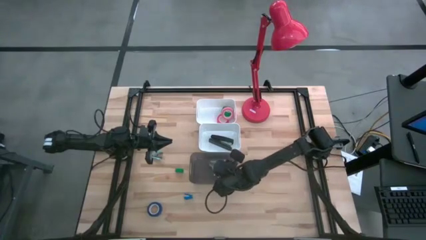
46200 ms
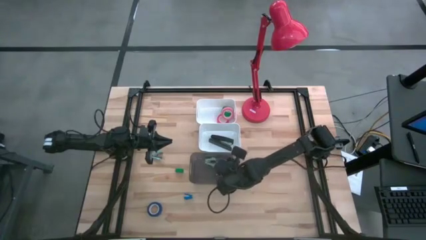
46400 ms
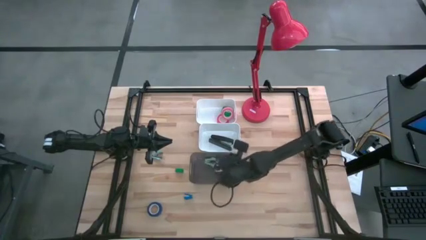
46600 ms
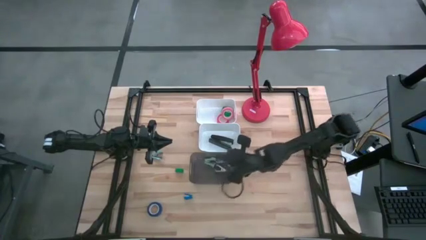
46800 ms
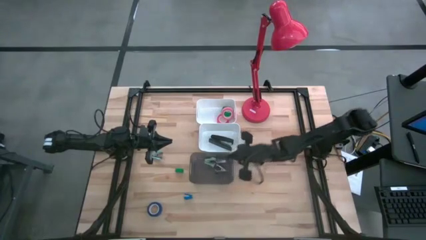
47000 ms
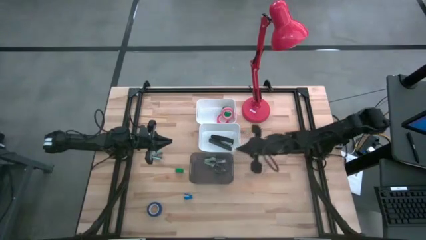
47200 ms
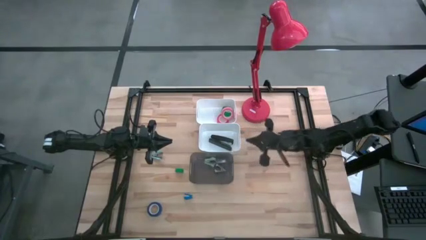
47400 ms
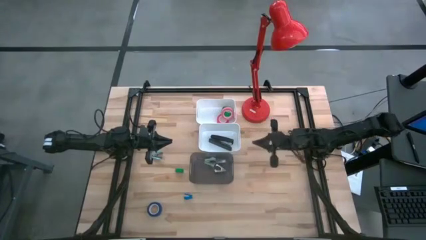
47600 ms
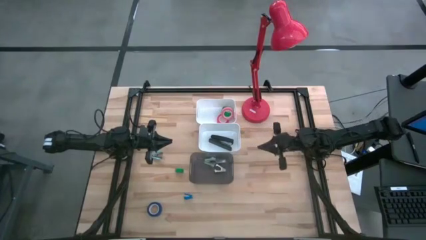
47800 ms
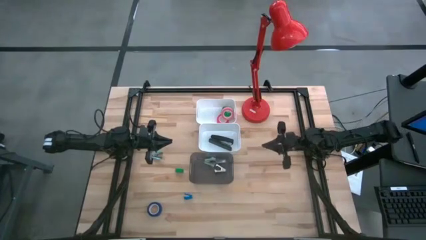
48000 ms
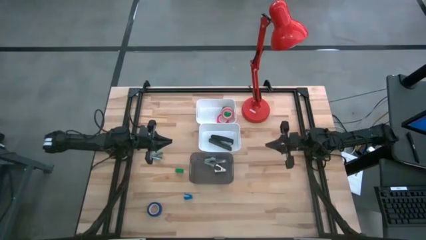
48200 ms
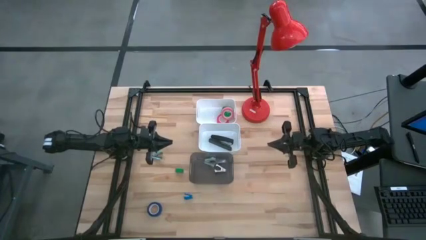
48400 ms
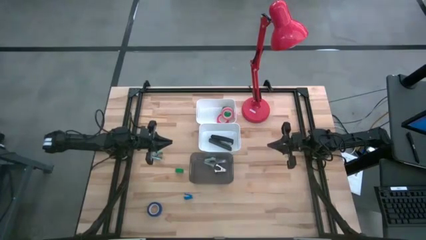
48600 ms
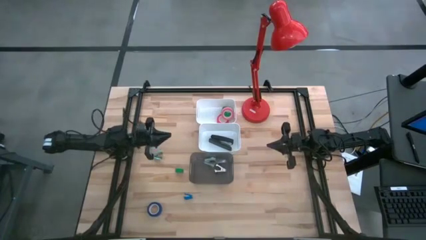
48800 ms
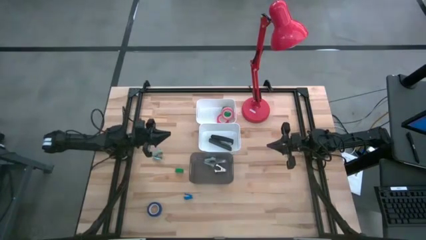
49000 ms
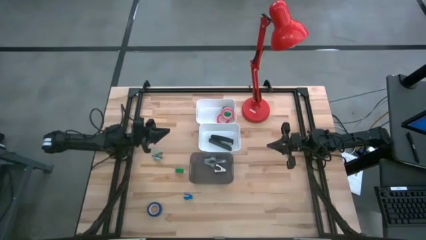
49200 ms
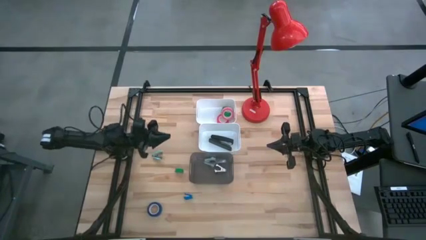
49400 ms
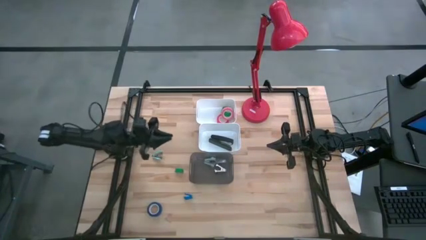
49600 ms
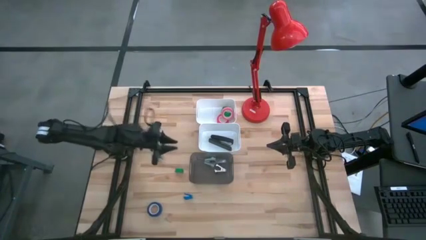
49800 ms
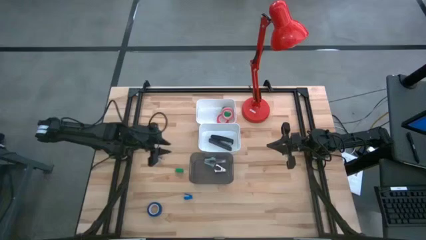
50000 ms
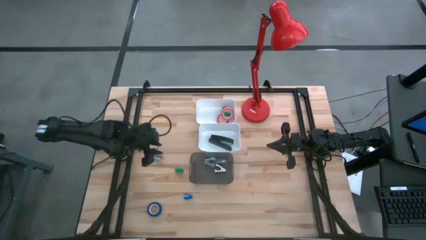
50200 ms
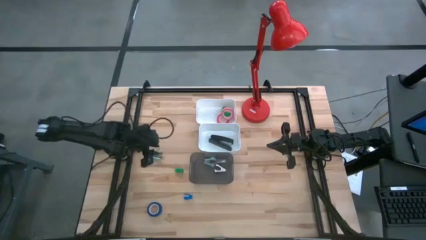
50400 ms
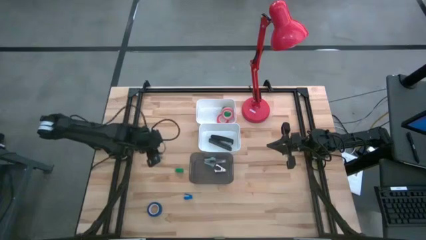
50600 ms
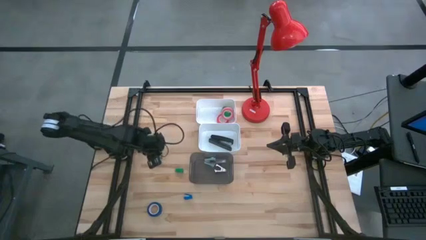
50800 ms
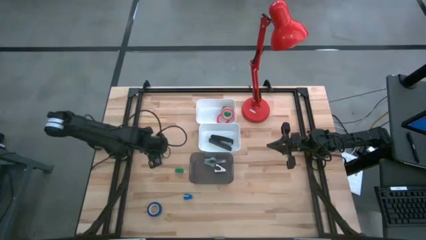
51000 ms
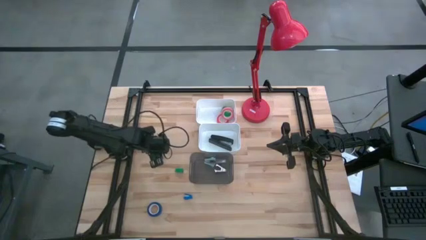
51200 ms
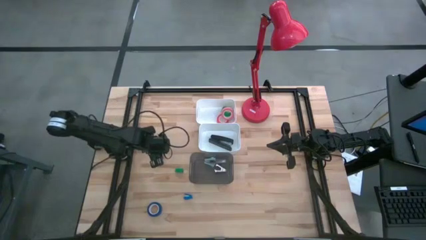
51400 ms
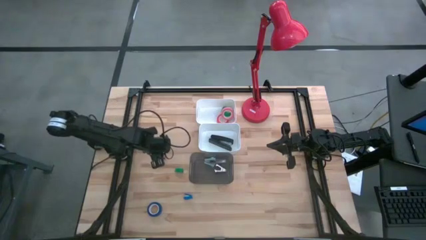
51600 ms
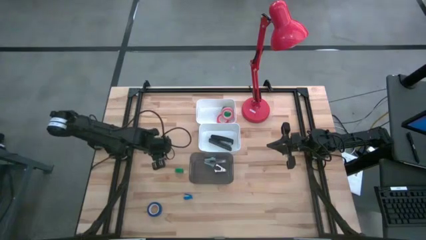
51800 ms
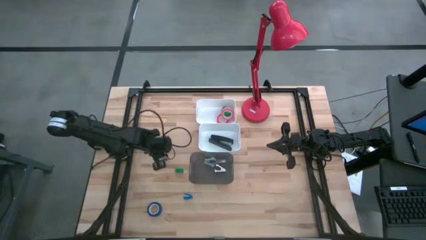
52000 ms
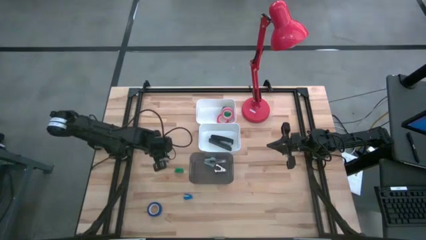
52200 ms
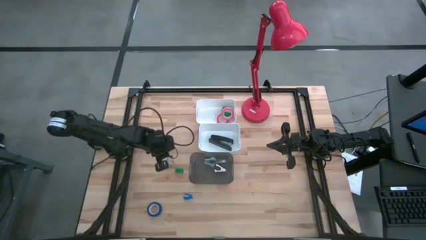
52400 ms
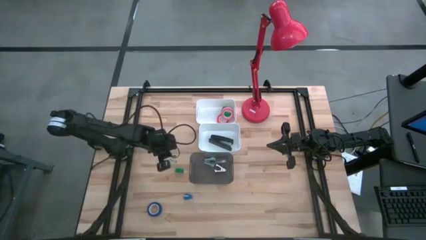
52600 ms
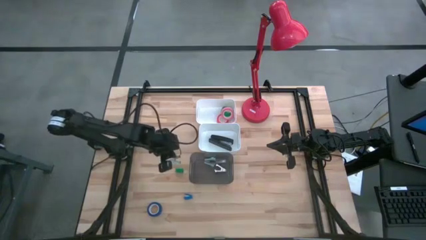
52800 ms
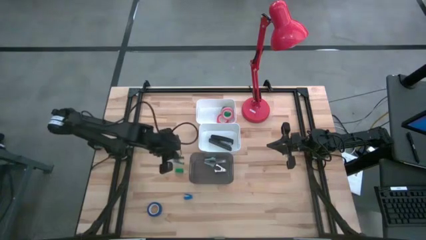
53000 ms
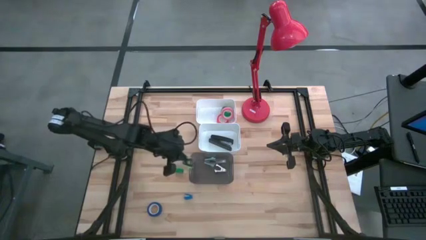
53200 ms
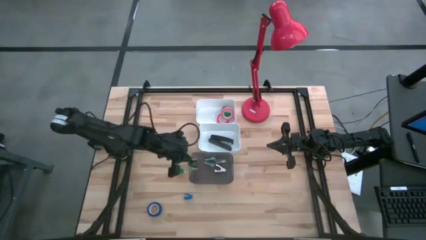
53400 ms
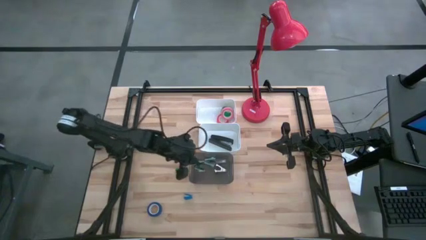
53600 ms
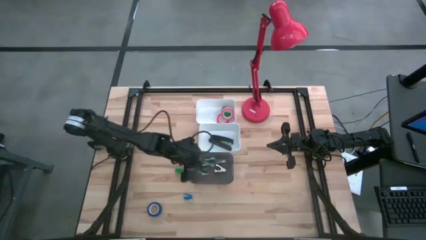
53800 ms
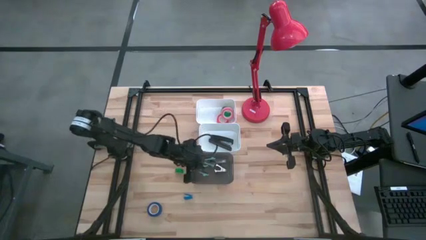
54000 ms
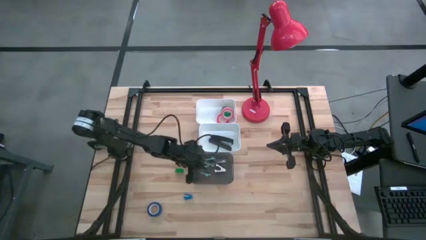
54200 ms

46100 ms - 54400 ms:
Task: Pick and place Stapler, Stapler remover, tape
Put the light blue stapler remover into the black bin

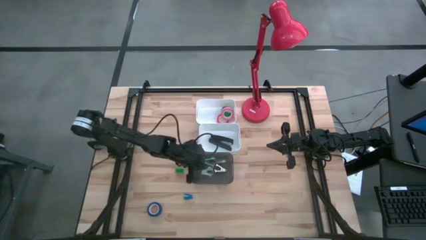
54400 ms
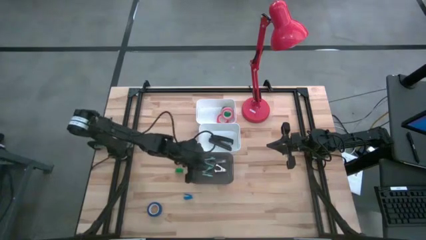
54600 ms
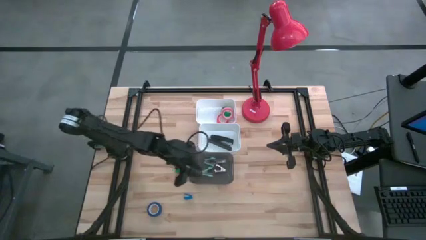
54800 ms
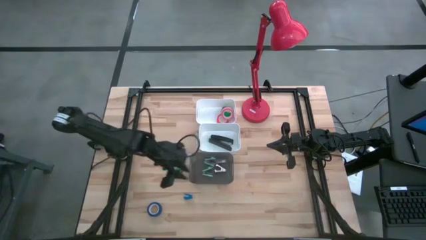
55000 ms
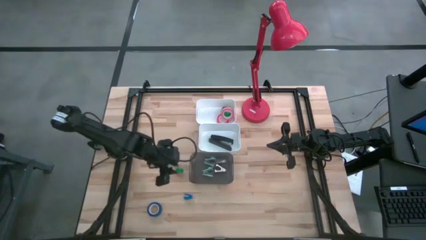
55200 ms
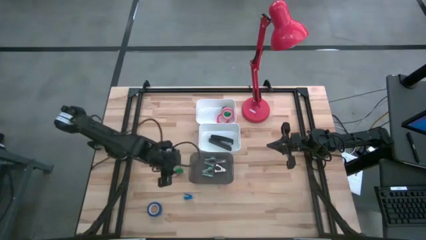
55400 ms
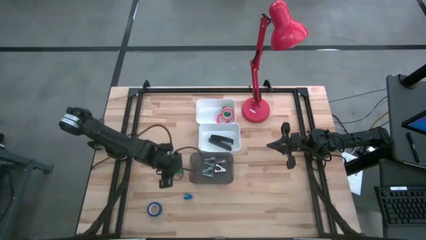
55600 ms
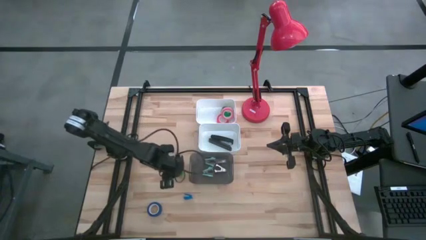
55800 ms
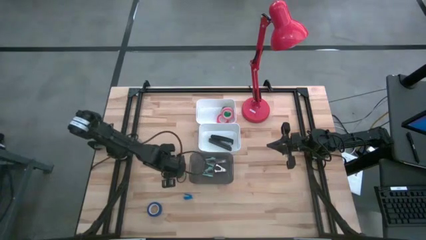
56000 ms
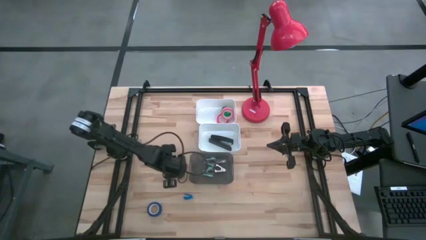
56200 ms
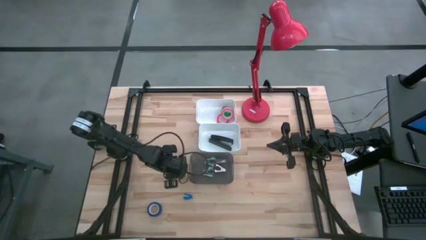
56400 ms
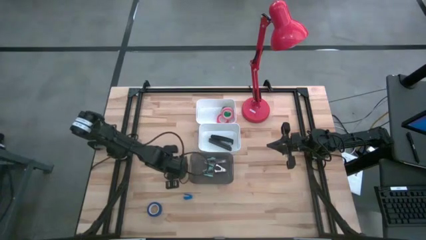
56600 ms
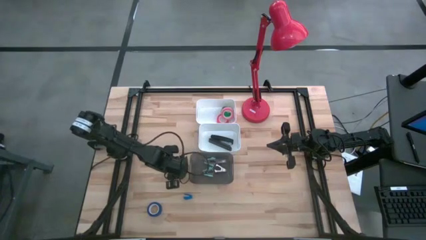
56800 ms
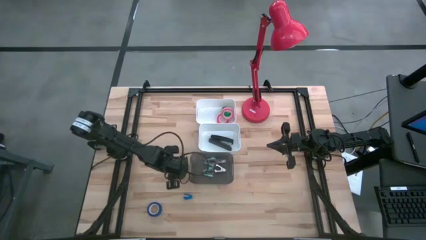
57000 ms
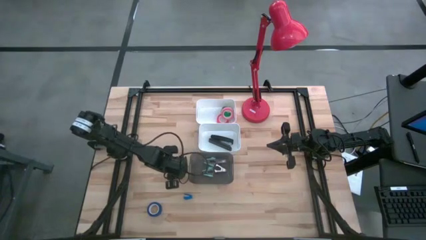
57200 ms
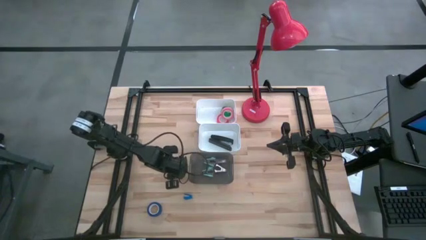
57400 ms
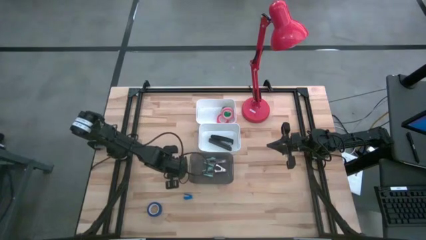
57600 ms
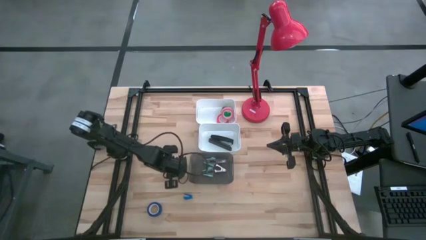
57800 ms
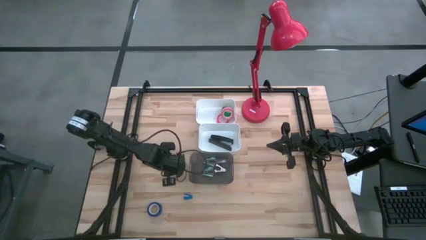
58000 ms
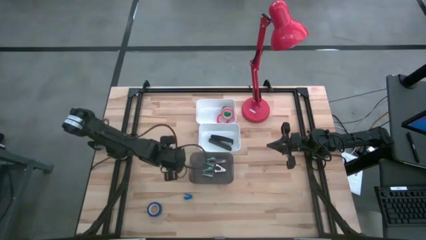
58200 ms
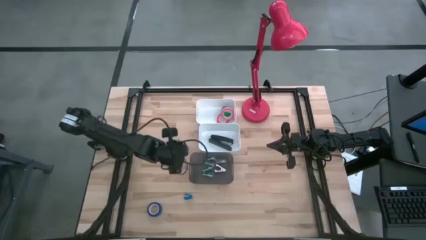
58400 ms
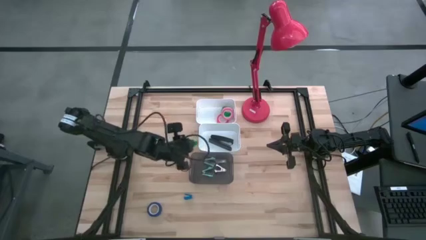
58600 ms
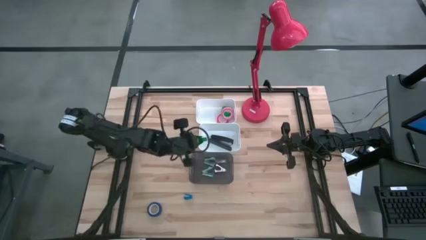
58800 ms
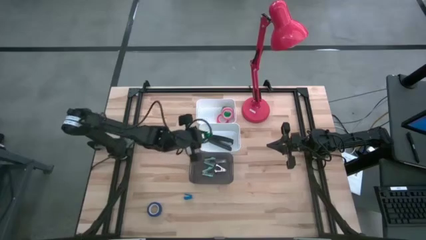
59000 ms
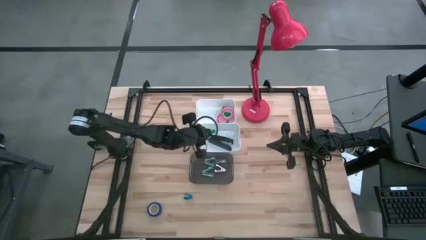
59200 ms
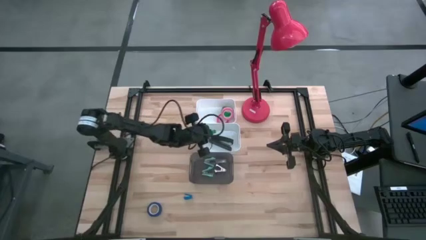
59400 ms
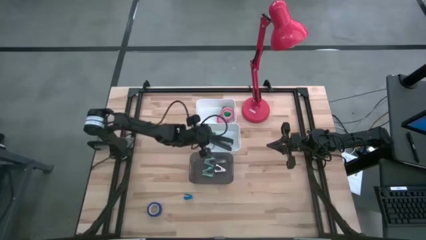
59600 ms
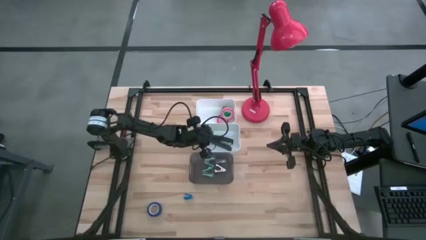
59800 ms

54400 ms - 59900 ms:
Put the green stapler remover into the black bin

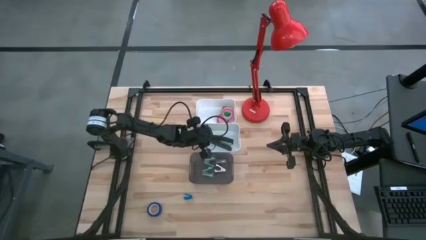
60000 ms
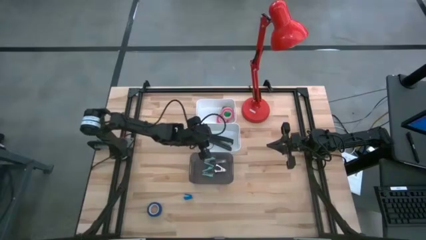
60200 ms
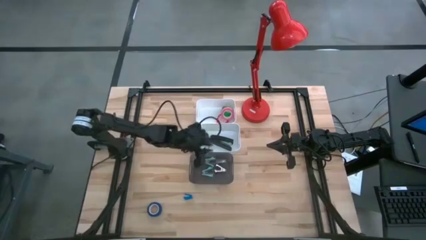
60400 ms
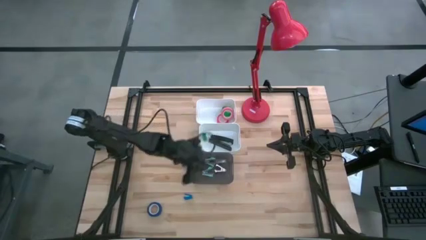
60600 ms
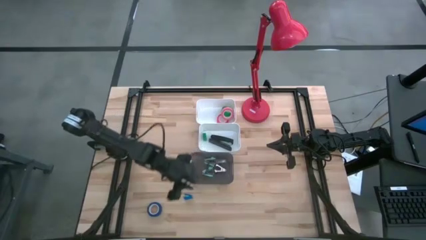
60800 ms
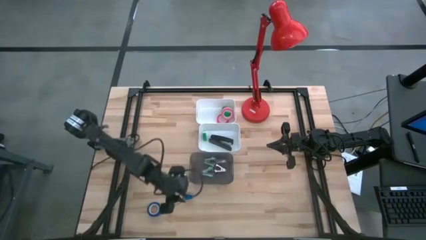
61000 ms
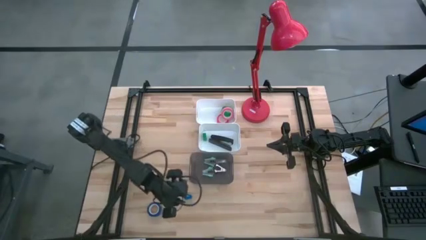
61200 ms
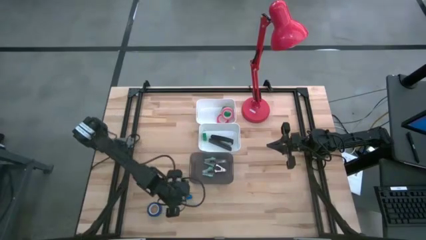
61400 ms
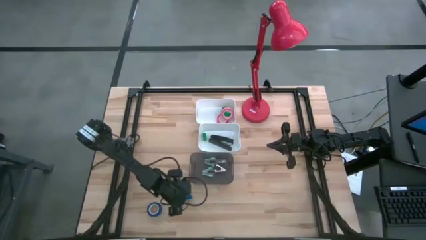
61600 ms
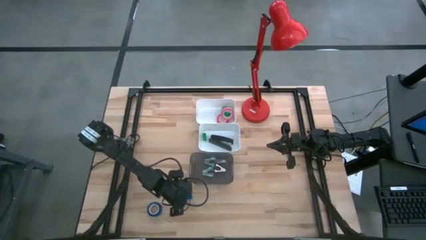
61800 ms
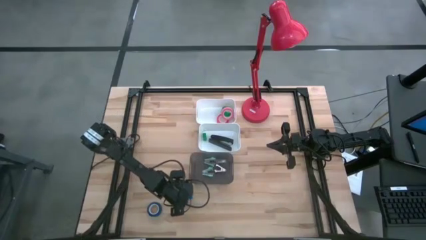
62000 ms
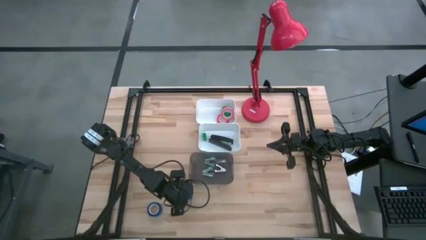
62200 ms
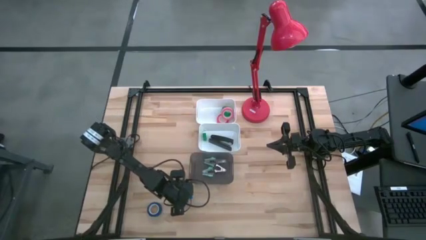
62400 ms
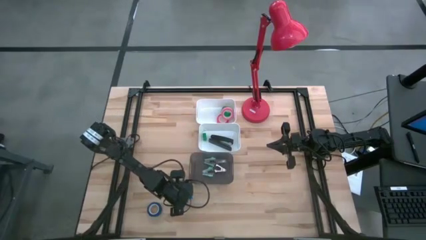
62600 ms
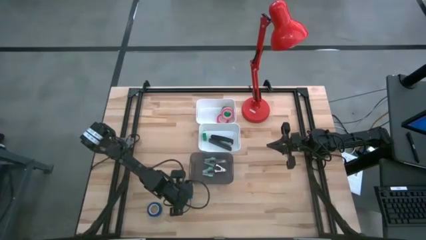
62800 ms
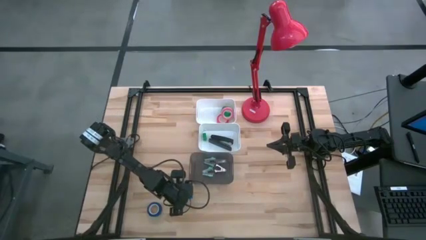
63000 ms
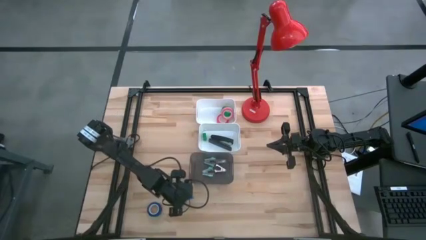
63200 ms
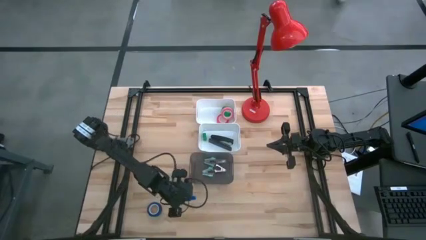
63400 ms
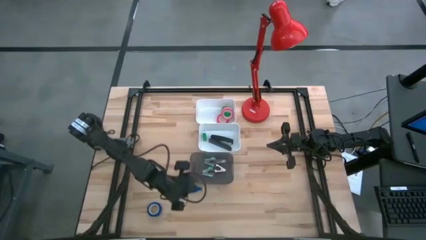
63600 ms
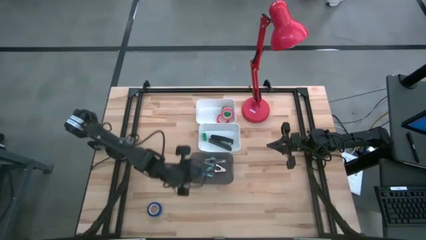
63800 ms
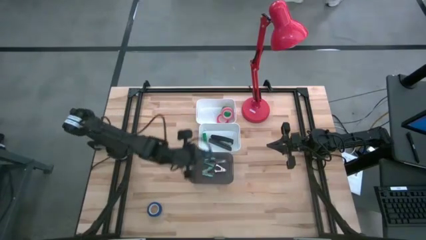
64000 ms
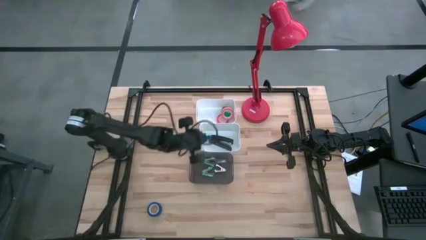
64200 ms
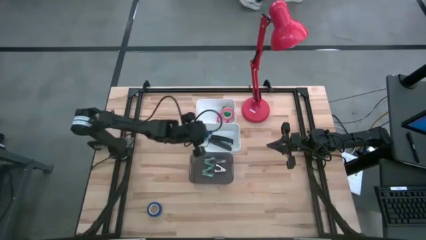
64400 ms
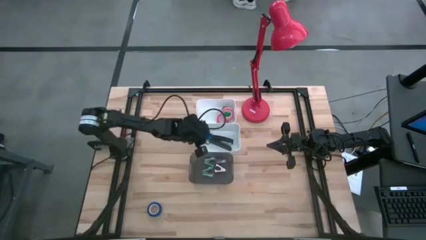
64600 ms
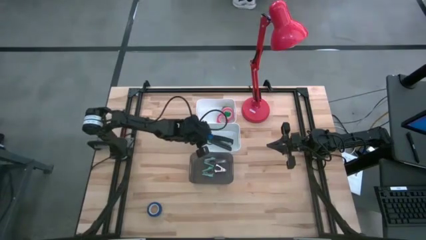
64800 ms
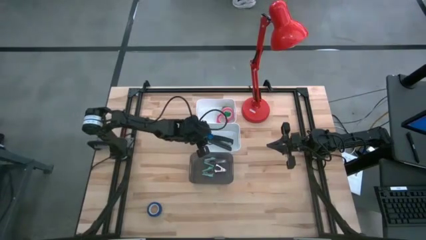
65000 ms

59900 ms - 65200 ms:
Put the blue stapler into the bottom white bin
